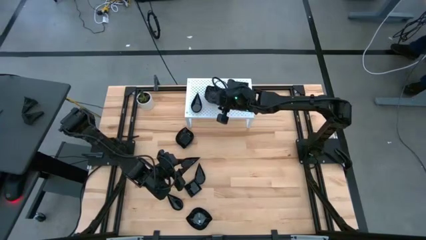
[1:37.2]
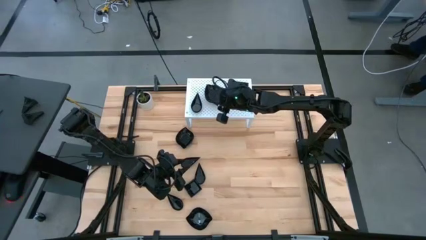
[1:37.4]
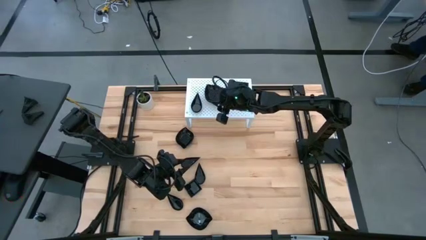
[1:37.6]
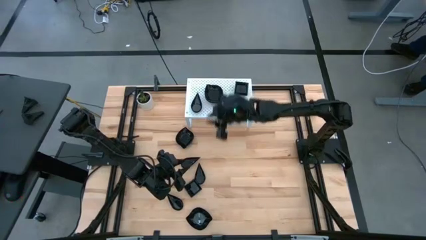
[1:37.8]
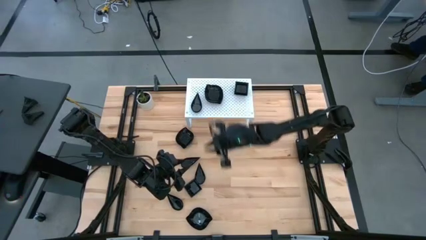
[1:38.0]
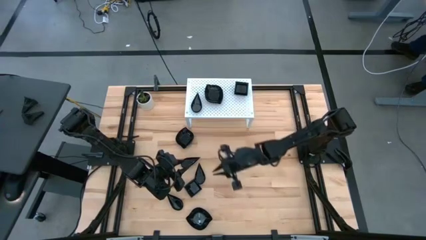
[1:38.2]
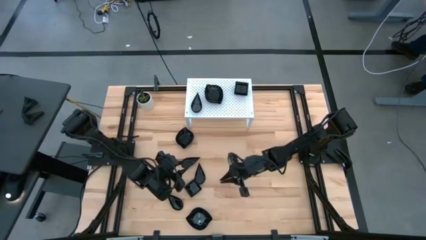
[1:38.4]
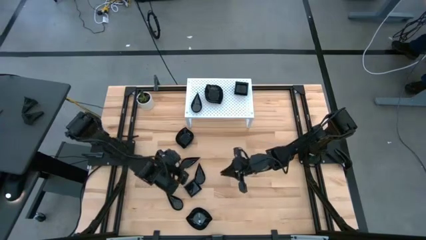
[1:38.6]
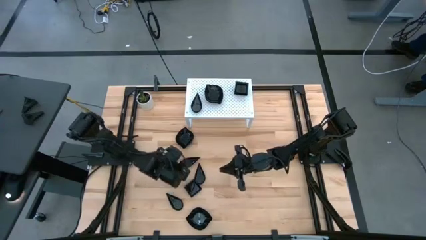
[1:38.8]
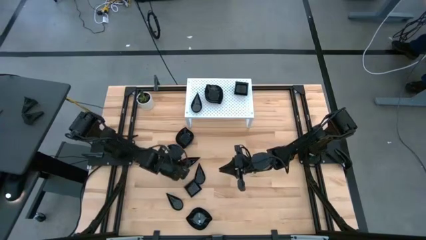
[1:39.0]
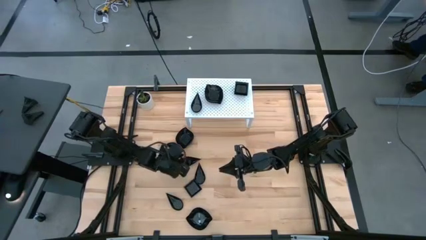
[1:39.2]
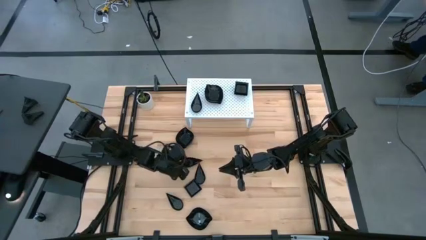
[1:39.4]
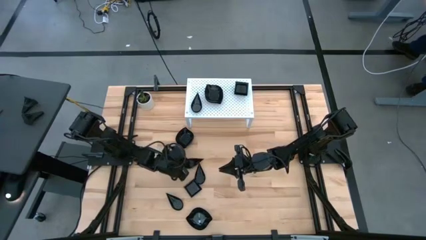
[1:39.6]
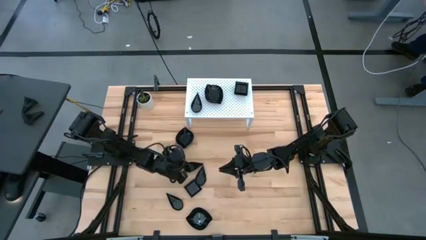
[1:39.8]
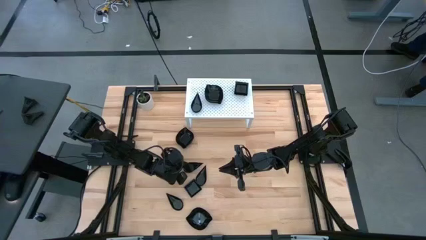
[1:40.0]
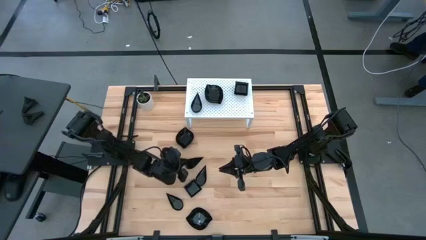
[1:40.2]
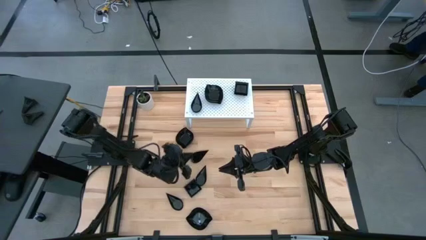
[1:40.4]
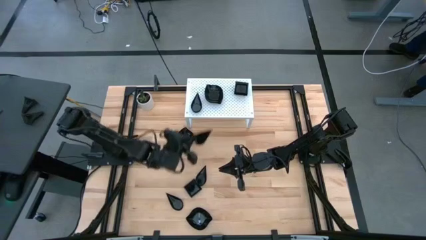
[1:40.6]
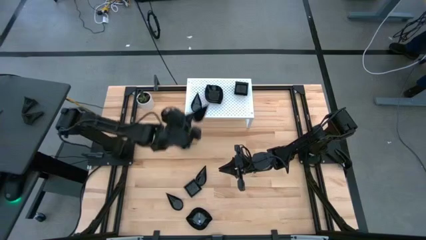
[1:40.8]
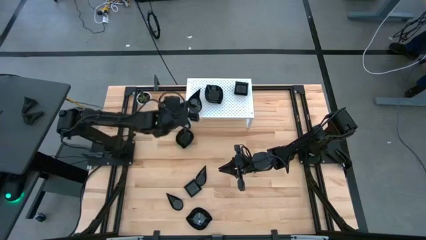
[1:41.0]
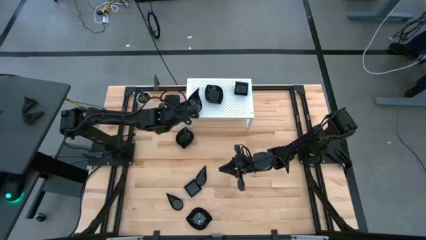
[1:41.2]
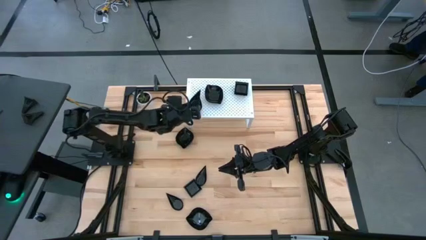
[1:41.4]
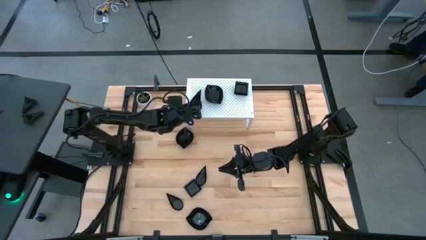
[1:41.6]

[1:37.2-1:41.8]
Task: Pick & Place Mini shaped plates
Stack the black drop-shaped plate on top of the other black drop-shaped plate on the shelf

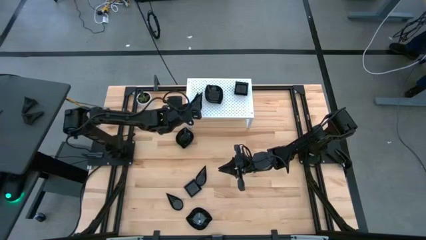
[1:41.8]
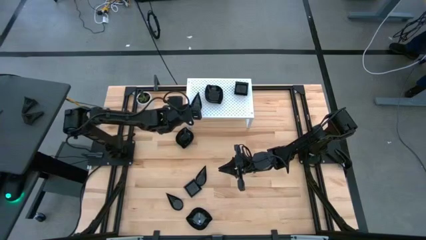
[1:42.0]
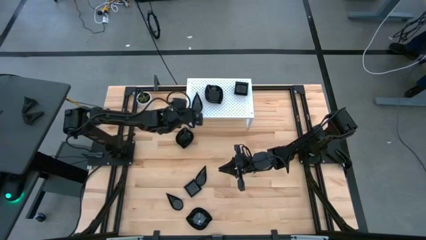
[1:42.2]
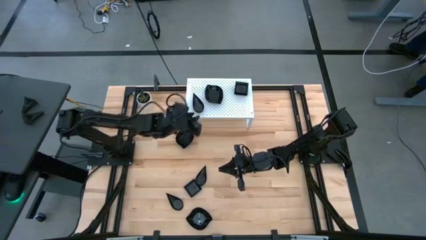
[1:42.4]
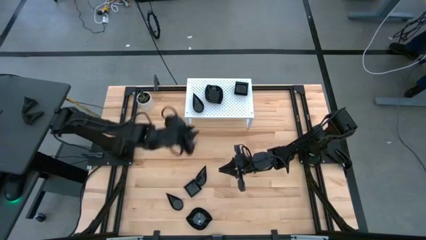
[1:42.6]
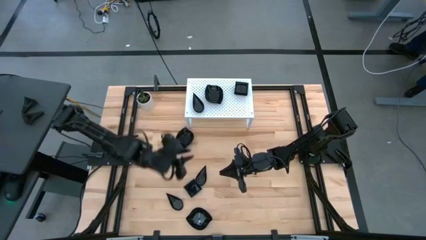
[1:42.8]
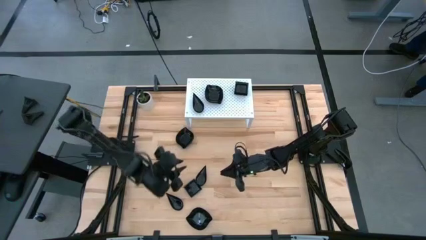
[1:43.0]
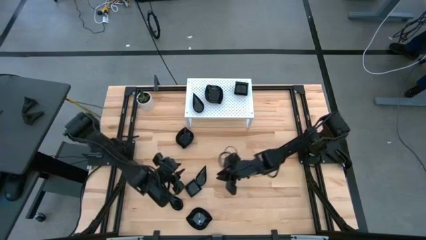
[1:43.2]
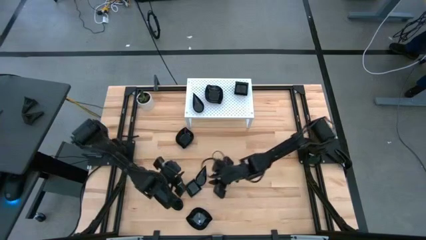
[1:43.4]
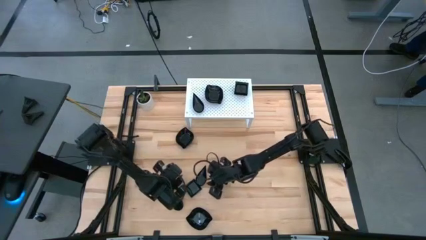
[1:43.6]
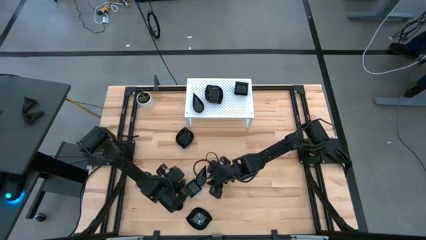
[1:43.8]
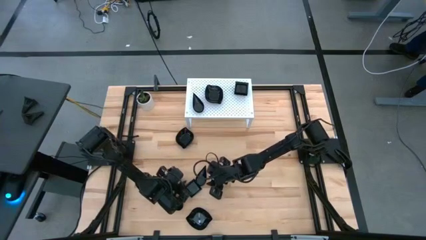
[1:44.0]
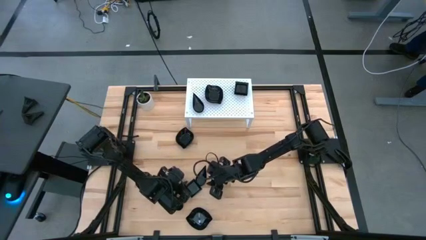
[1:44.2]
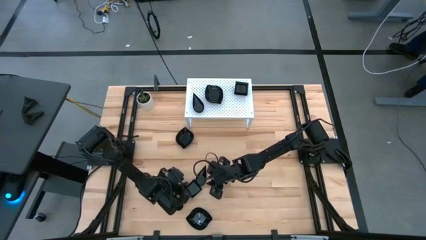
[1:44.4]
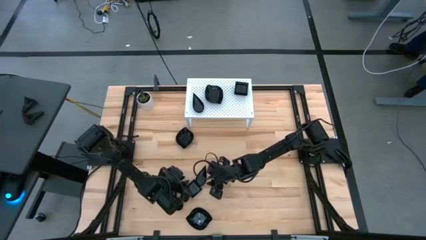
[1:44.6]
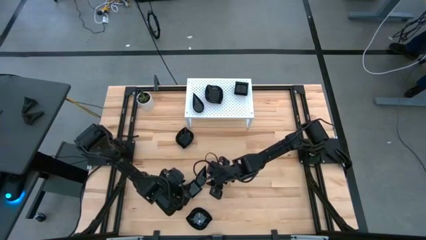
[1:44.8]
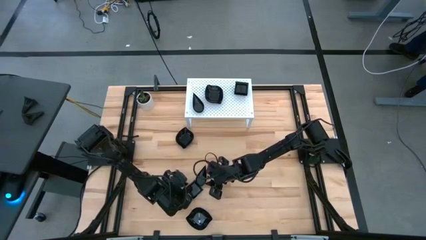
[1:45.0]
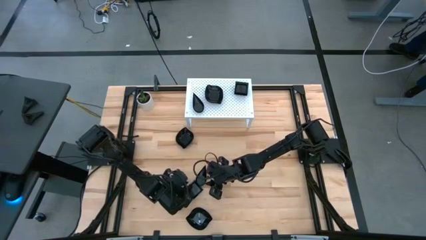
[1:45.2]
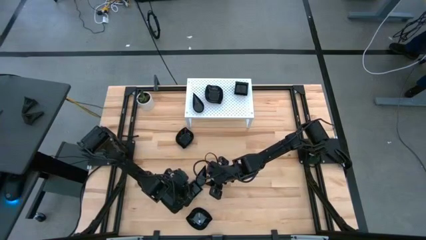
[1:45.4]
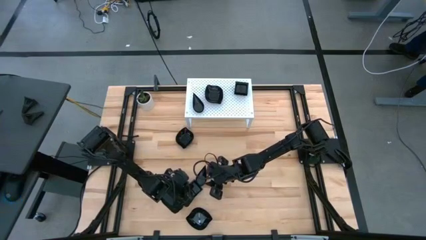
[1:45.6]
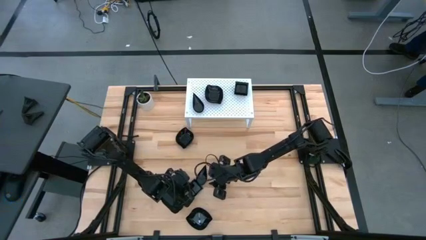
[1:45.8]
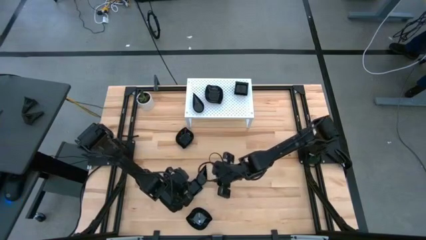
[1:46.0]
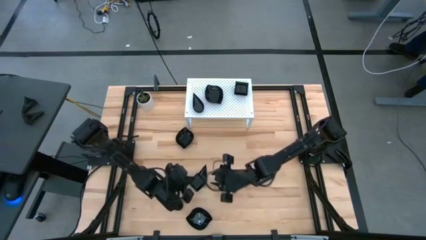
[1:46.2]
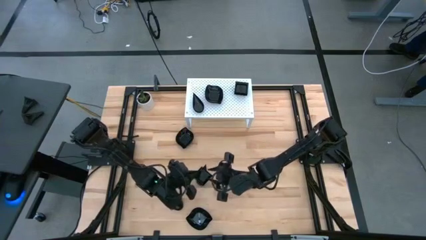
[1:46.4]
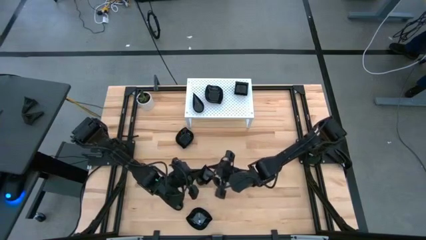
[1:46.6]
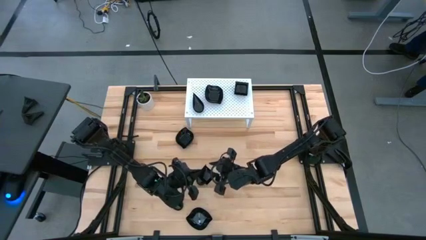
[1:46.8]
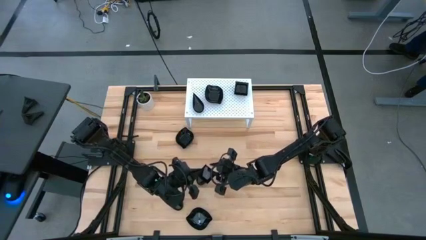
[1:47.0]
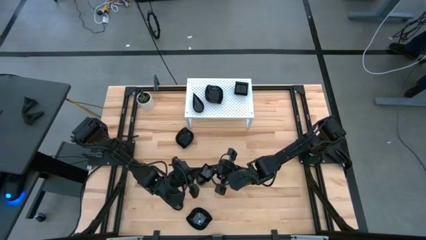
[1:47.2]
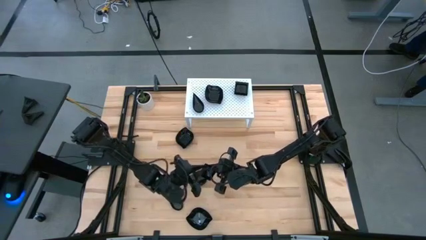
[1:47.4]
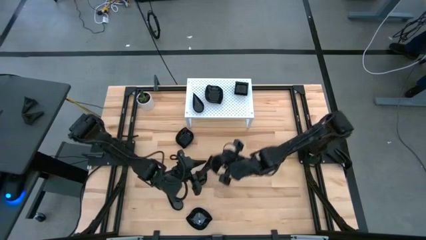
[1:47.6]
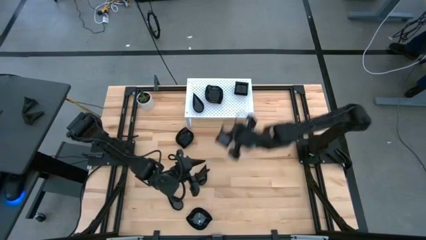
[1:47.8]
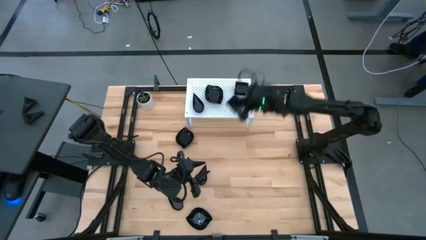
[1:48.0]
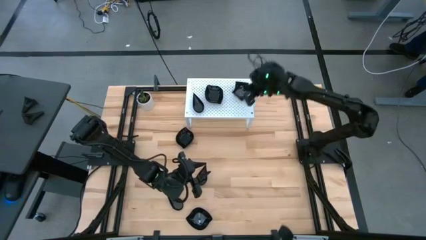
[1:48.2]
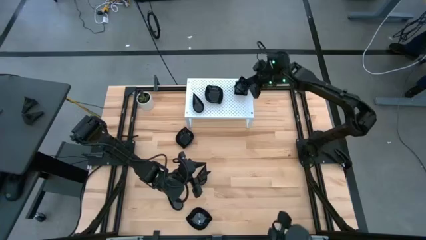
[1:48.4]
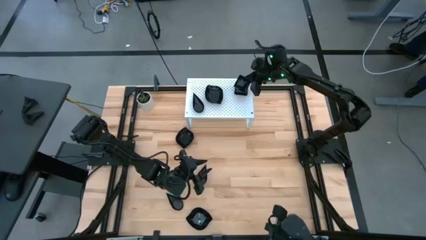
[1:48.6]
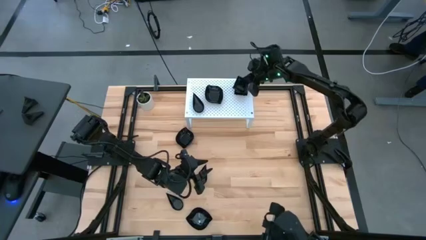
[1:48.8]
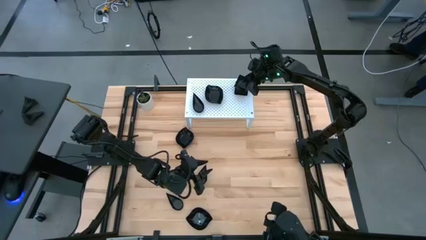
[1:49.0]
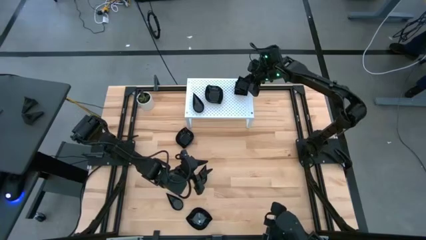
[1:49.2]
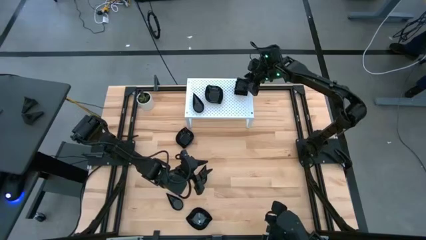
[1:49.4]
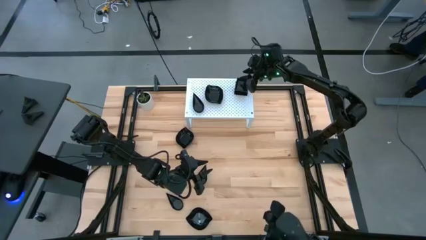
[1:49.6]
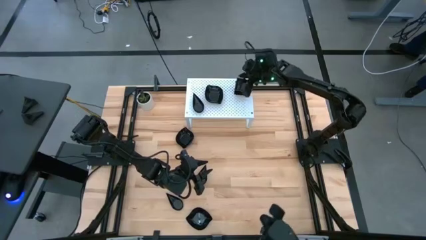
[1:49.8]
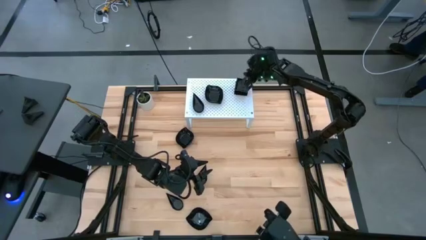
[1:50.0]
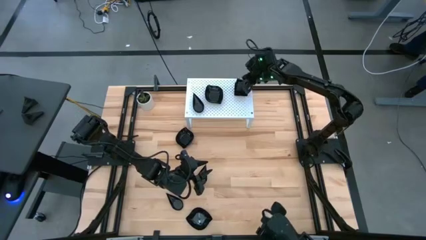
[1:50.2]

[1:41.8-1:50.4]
Stack the black square plate on top of the other black square plate on the shelf

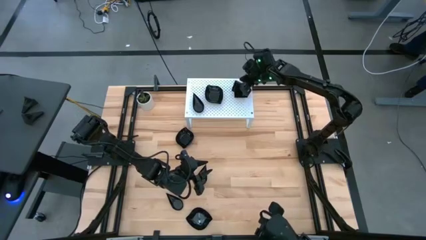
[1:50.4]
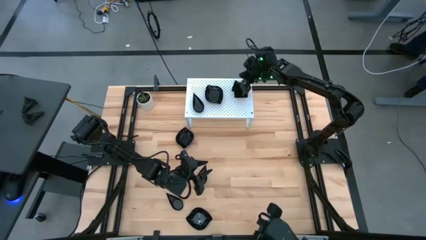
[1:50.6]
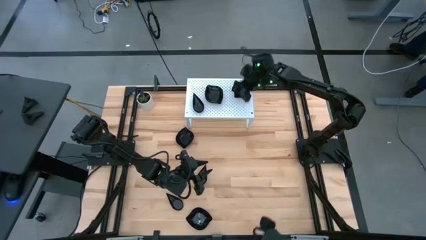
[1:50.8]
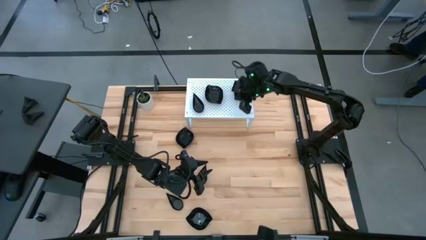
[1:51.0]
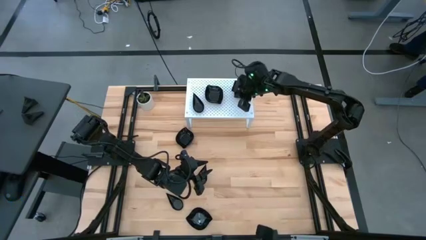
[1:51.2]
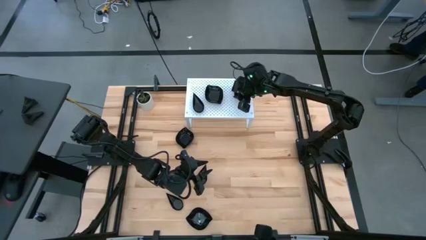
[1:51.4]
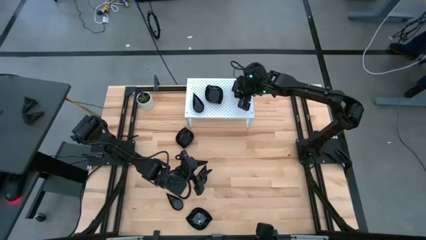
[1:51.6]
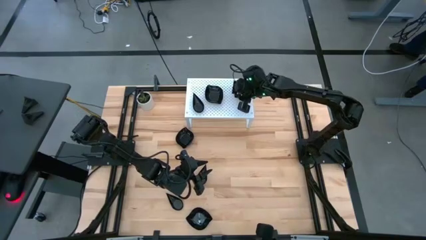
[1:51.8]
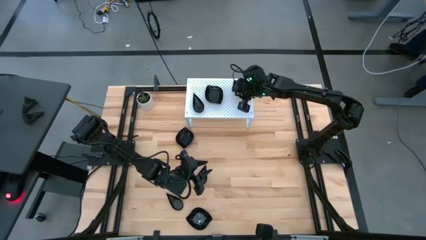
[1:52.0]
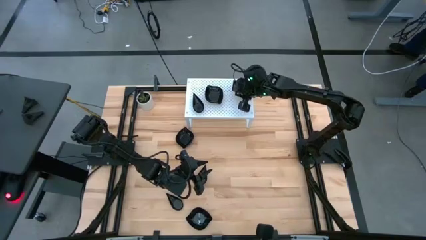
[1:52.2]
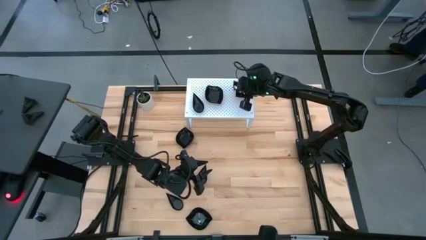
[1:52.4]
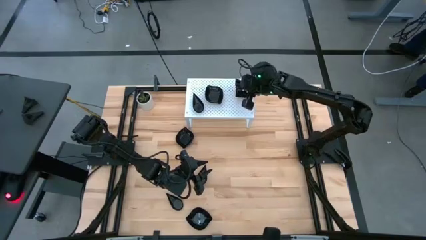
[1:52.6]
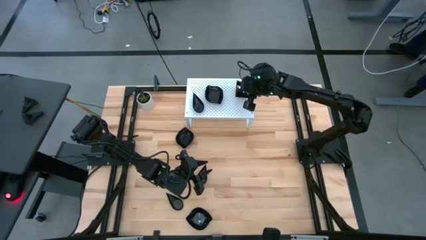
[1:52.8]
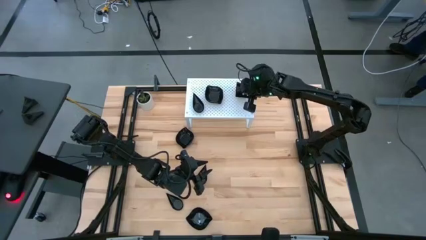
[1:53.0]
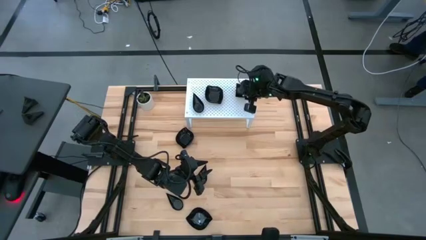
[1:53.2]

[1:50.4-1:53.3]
Stack the black square plate on top of the other black square plate on the shelf

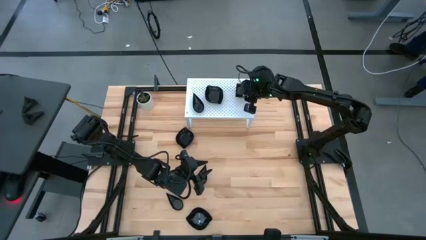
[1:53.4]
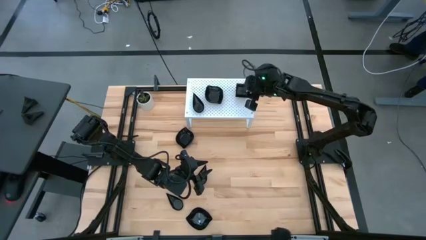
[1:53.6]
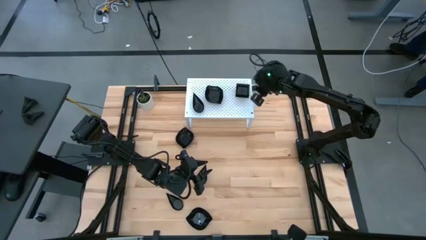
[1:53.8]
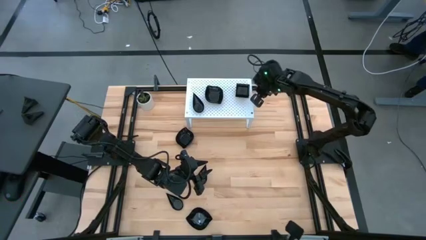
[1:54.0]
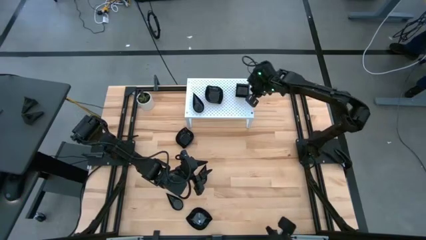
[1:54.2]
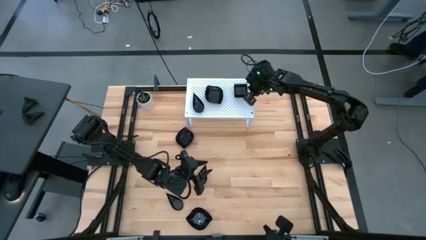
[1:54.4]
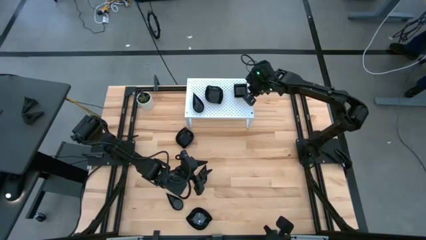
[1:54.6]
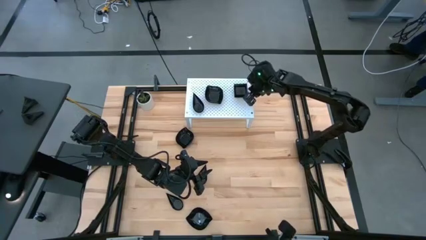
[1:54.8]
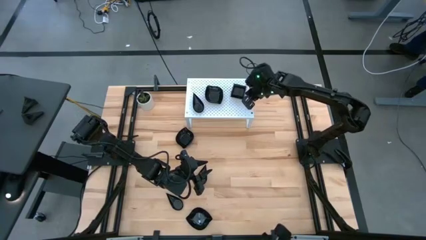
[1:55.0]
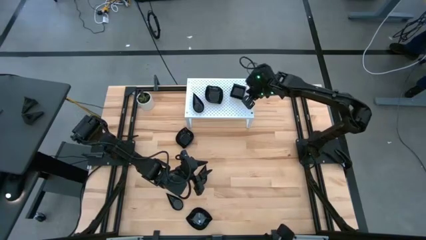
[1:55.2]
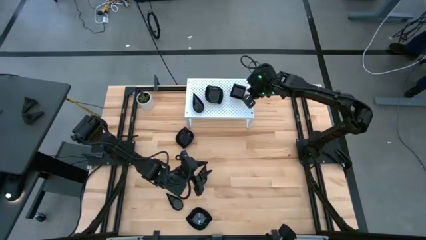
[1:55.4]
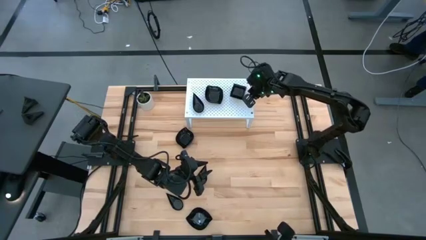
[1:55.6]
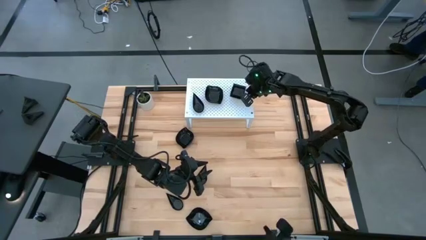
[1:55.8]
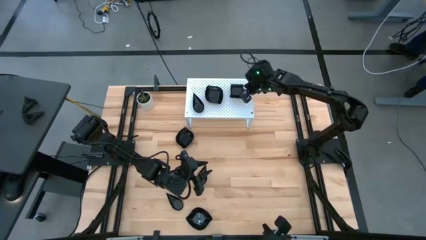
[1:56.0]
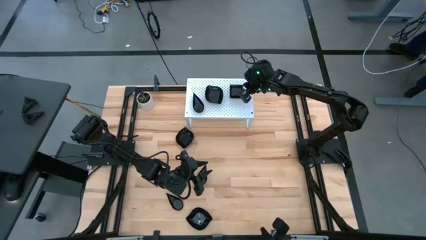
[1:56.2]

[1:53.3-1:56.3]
Adjust the stack of black square plates on the shelf
